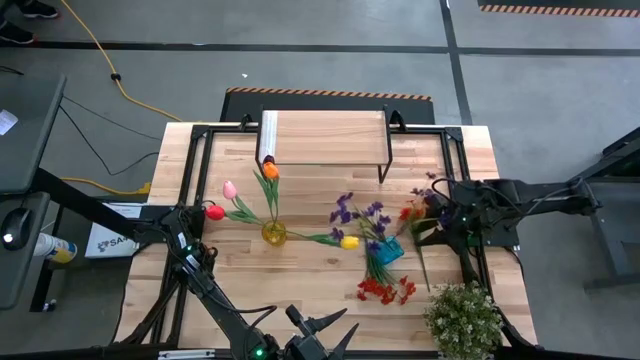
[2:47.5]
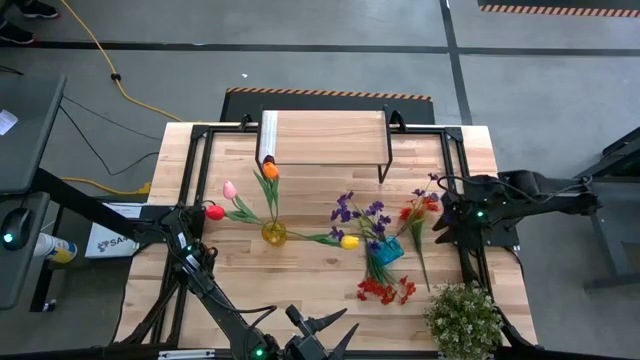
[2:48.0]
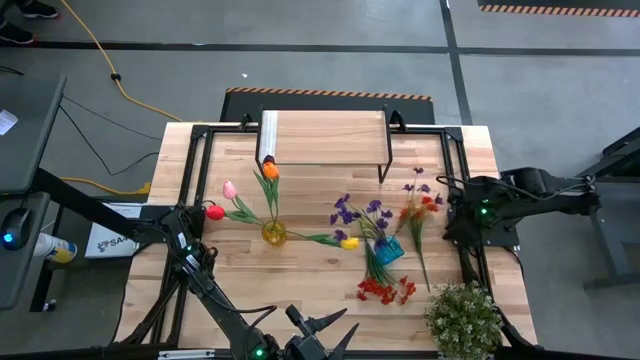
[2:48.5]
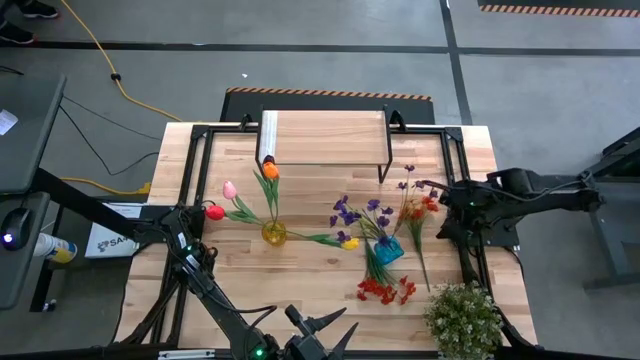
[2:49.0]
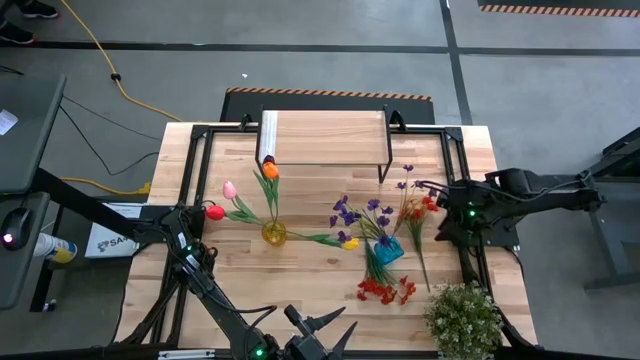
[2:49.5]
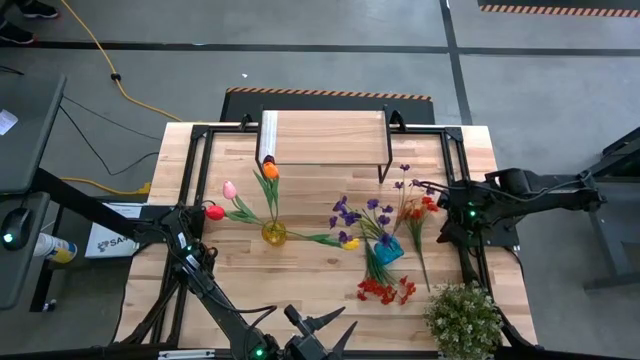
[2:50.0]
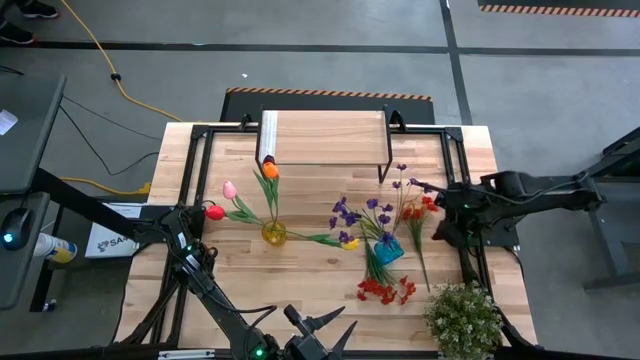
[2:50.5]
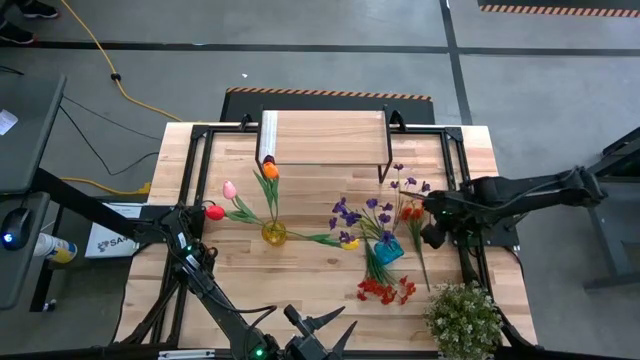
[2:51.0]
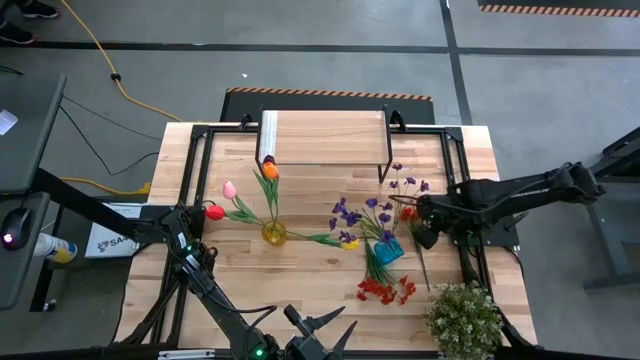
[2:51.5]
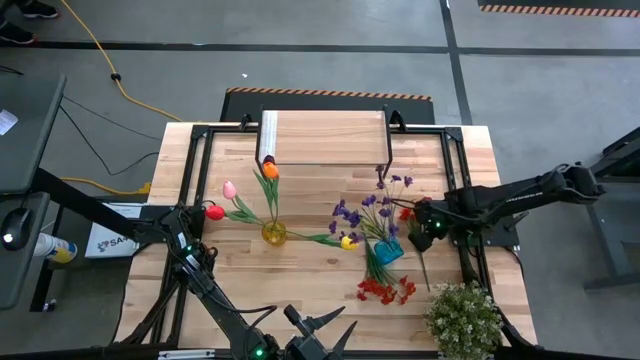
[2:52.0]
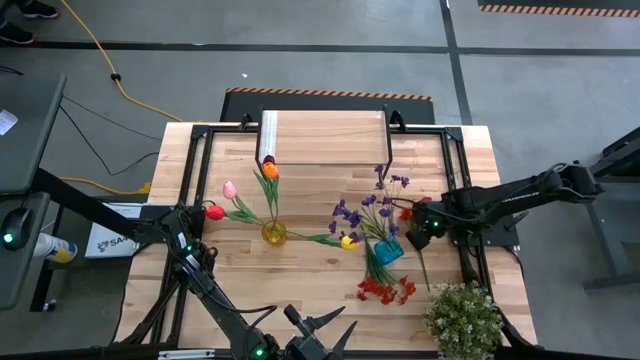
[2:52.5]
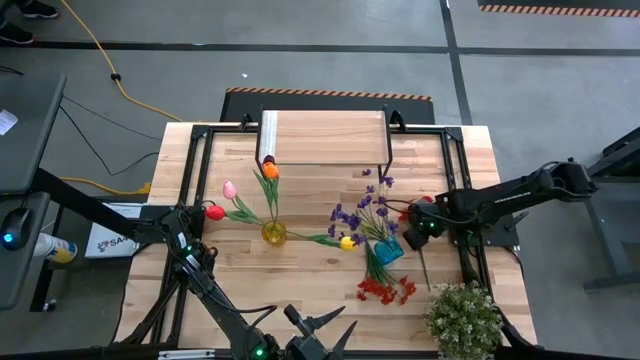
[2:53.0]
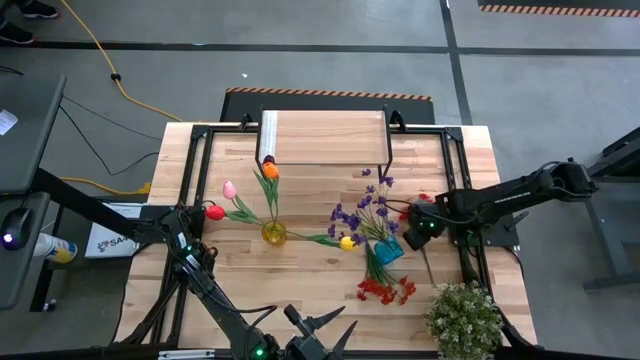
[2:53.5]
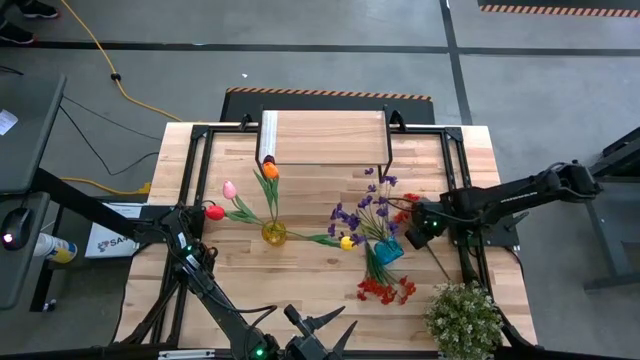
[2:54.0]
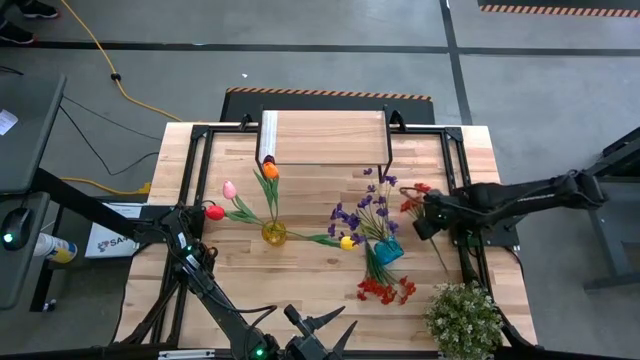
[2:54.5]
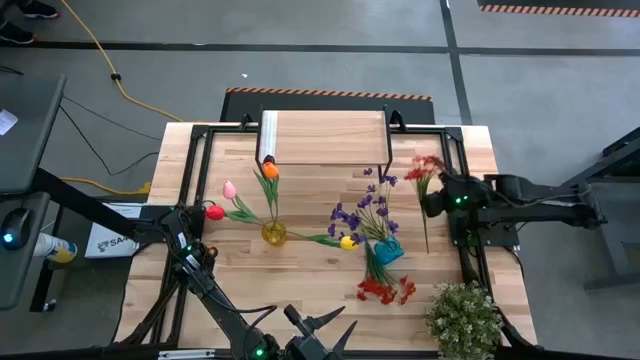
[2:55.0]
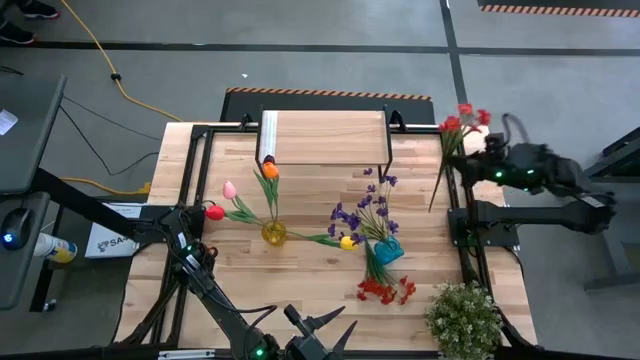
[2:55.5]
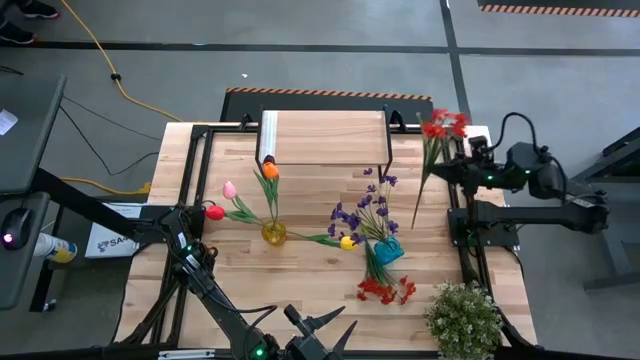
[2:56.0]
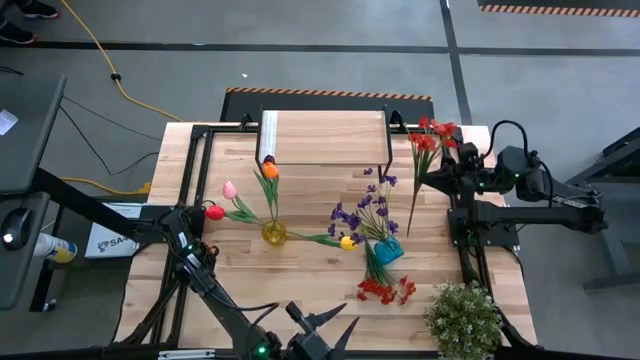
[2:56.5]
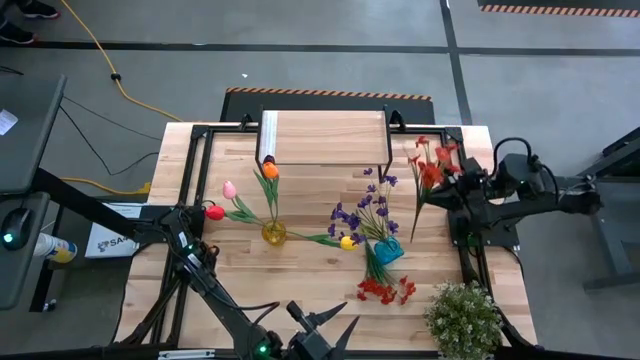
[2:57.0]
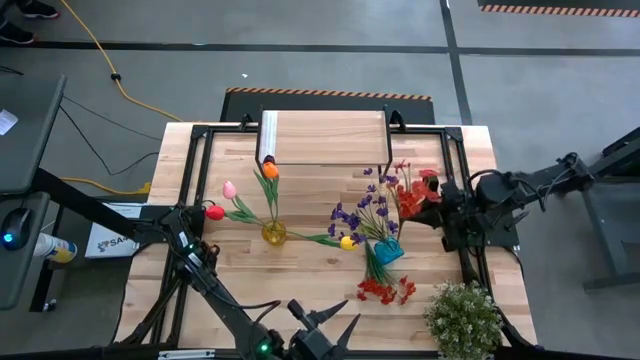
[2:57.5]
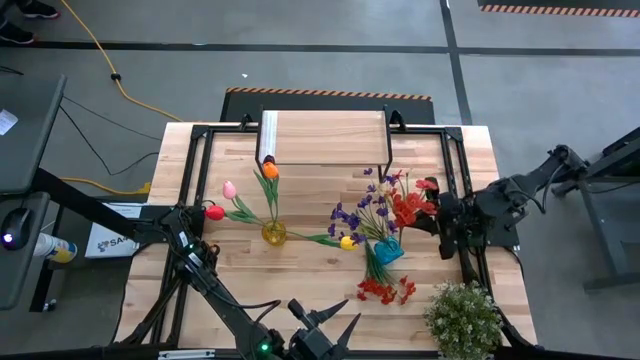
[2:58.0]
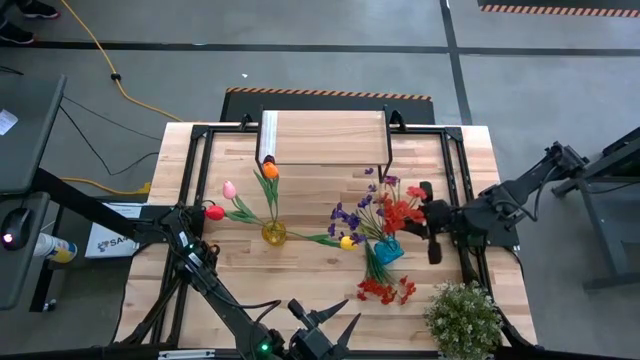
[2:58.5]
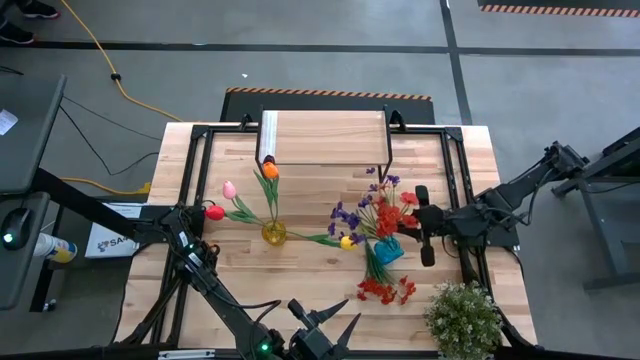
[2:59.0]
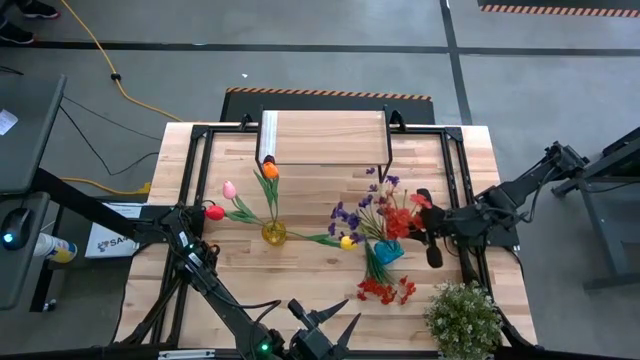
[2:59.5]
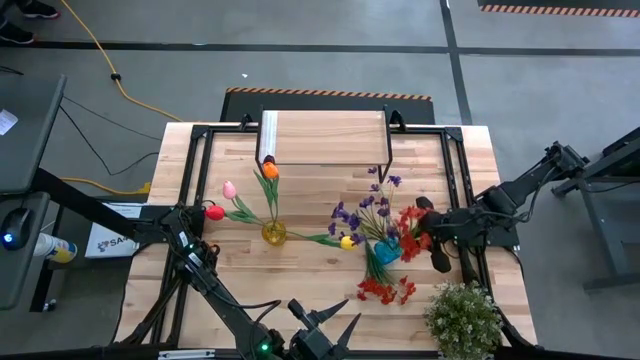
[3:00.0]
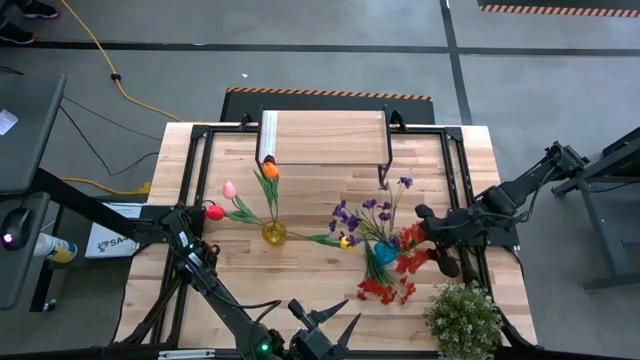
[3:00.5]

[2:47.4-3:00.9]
Task: Pick and place flowers into a vace then onto a shelf
Put the right red flowers into the blue vase

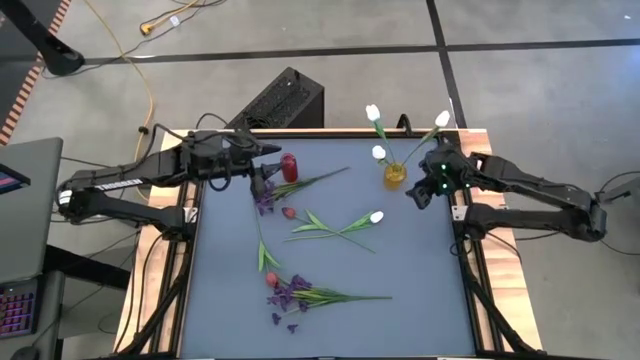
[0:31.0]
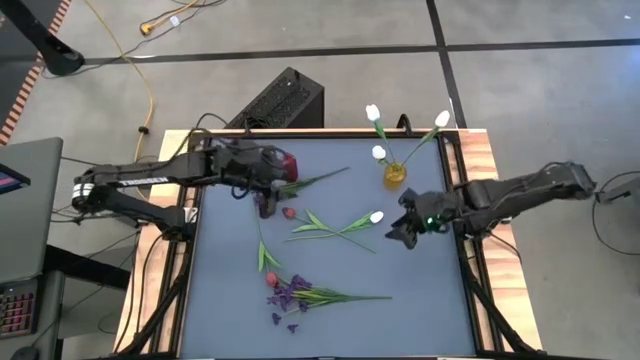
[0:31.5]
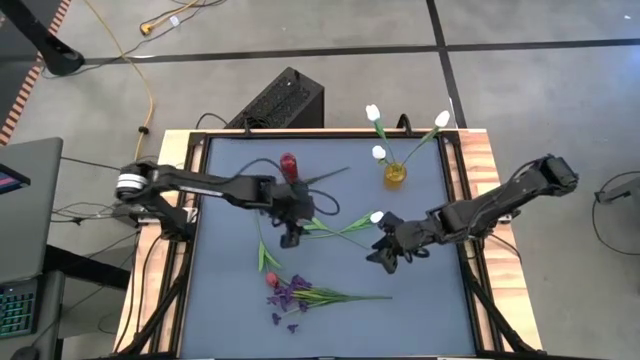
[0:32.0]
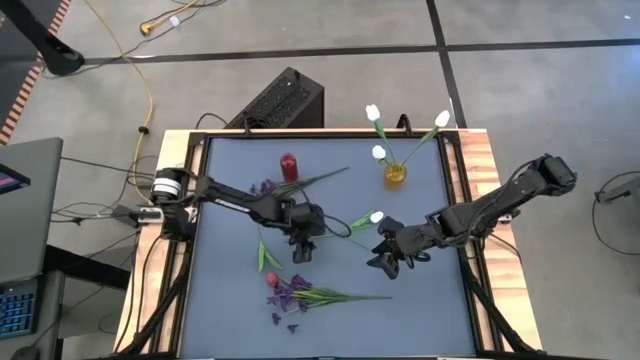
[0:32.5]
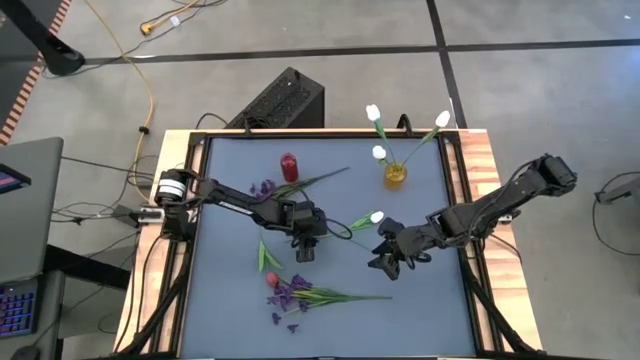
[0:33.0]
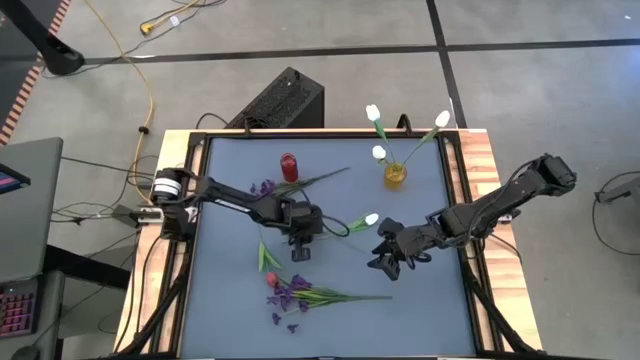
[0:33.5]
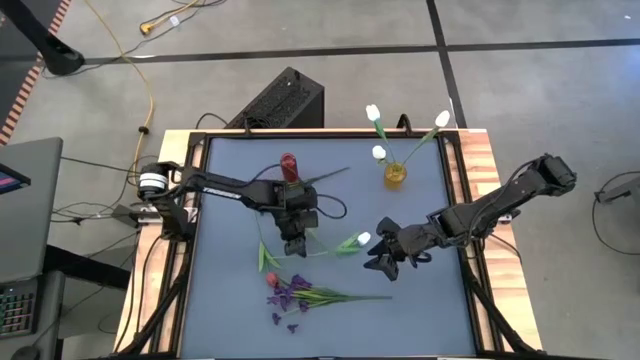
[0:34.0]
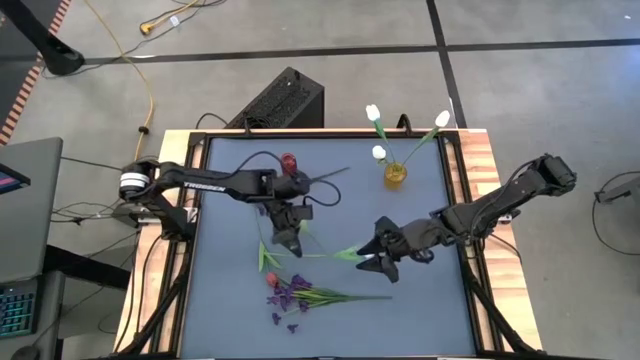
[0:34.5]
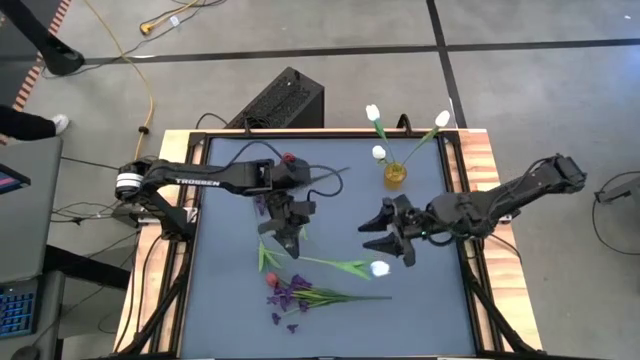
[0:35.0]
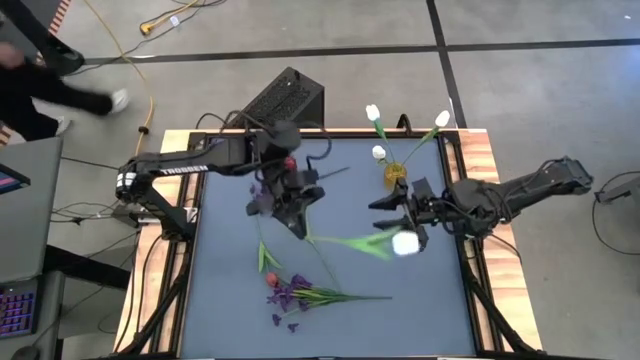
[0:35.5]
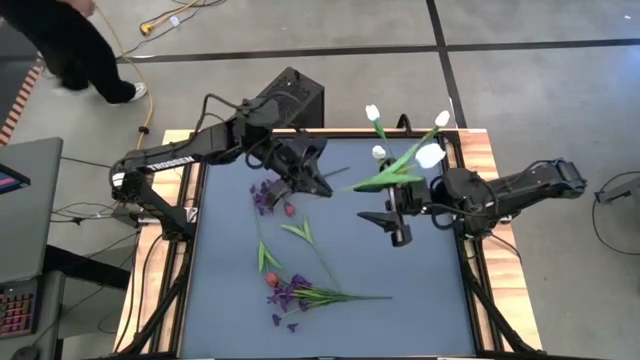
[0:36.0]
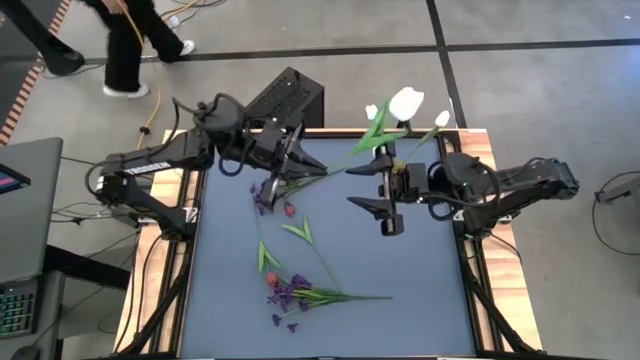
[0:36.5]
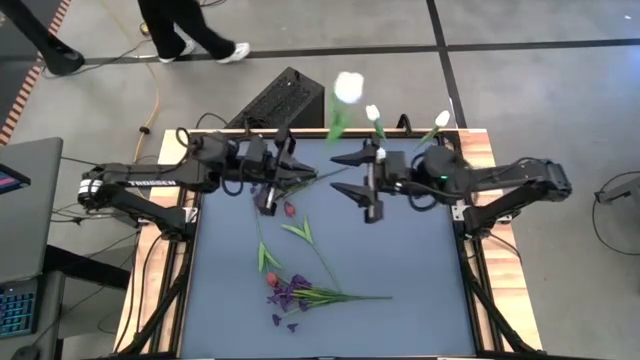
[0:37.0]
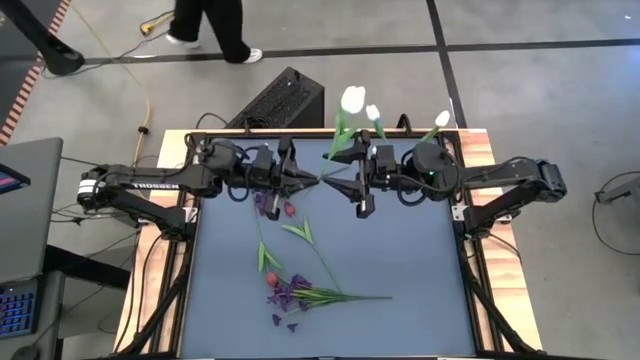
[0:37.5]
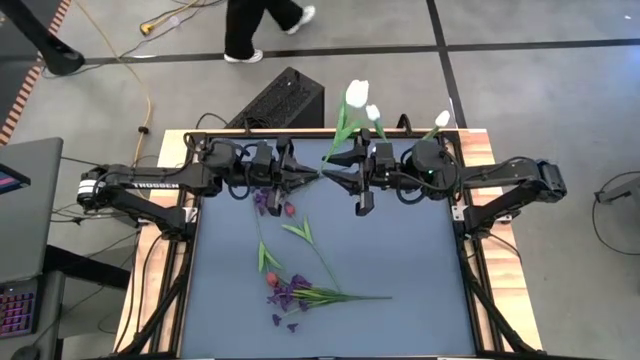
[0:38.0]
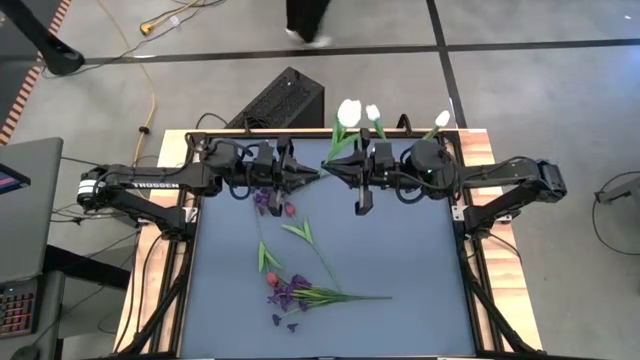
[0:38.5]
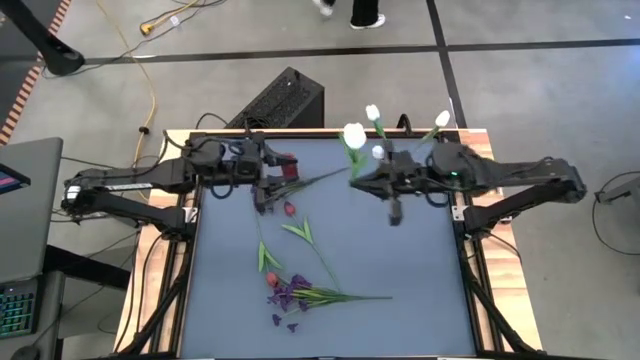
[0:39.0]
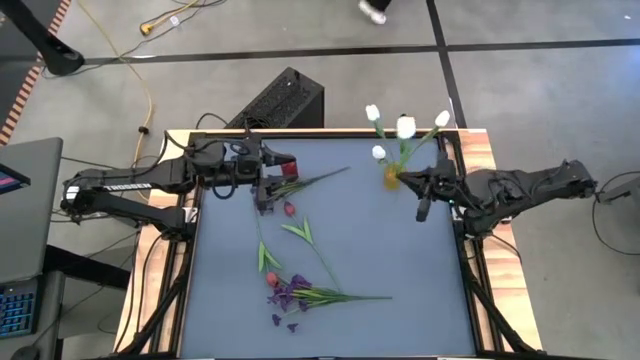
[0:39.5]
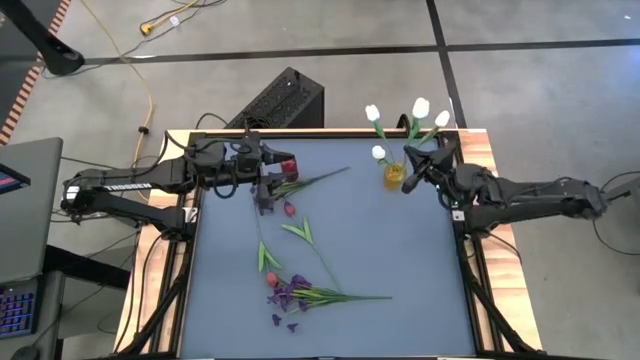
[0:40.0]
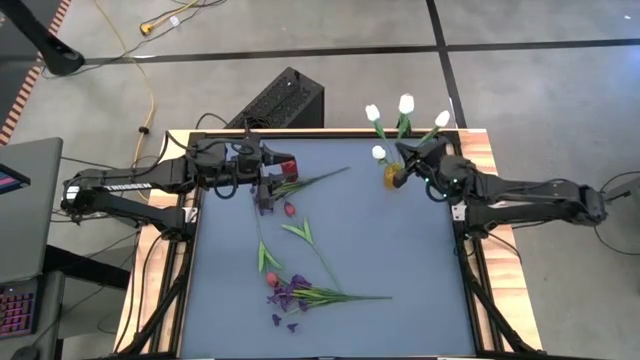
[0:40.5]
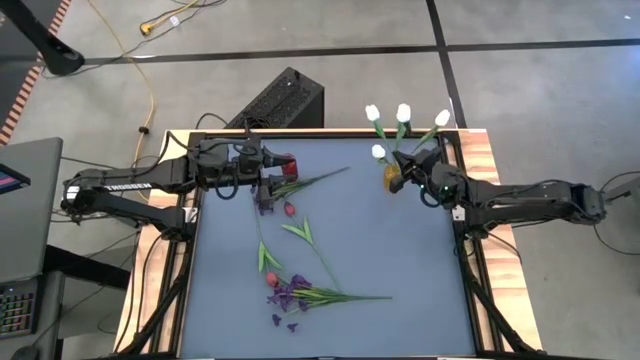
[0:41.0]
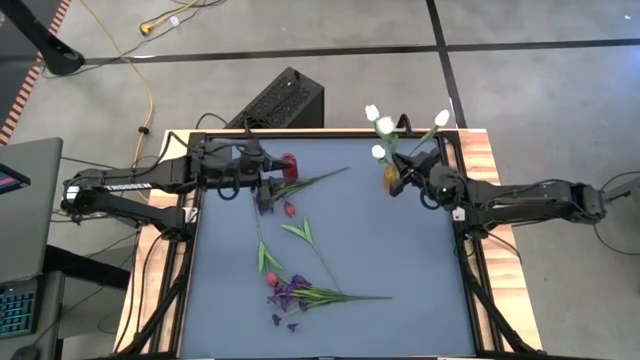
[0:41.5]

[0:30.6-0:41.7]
Task: Sort flowers into vase by color
Put the white flower into the yellow vase
